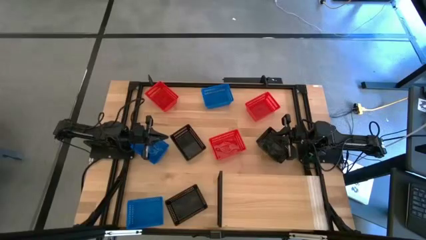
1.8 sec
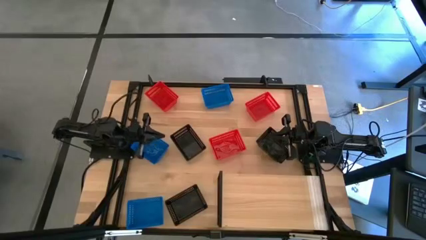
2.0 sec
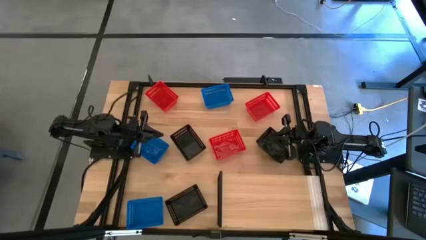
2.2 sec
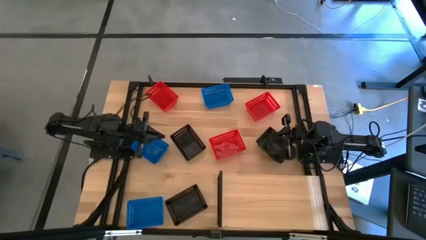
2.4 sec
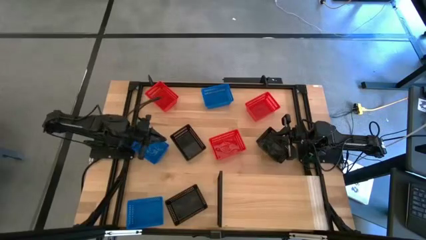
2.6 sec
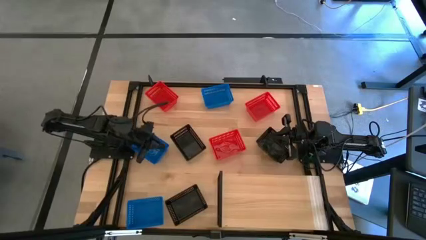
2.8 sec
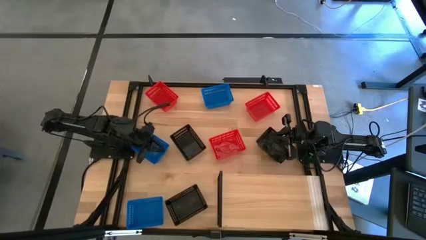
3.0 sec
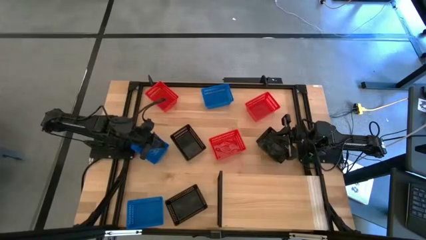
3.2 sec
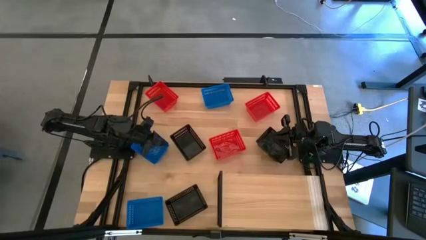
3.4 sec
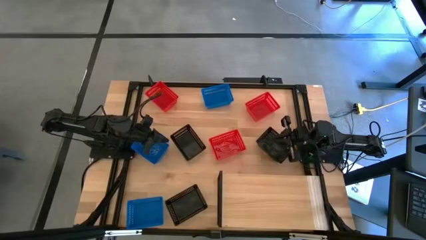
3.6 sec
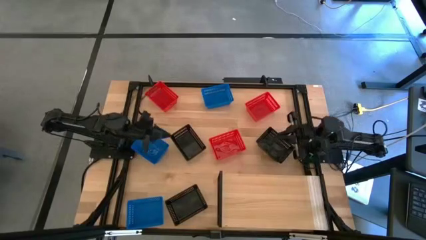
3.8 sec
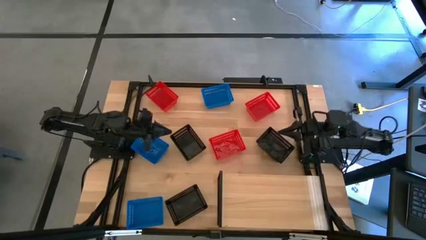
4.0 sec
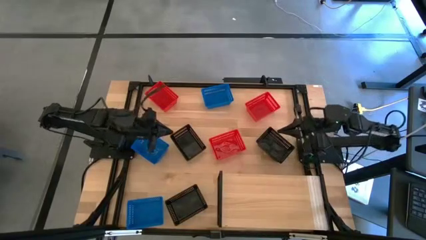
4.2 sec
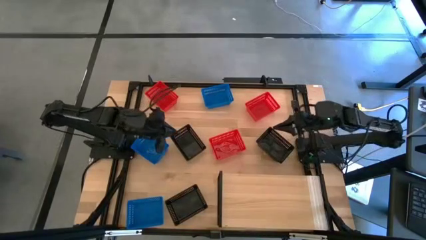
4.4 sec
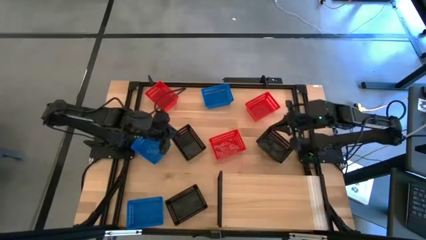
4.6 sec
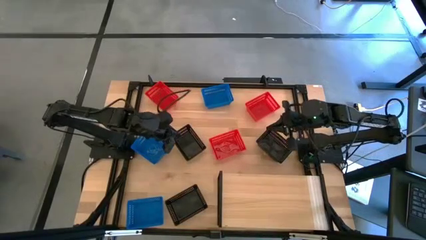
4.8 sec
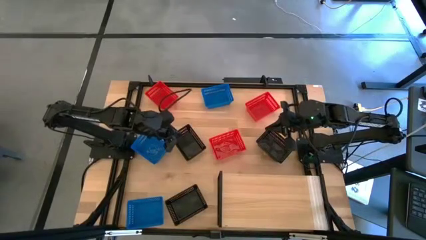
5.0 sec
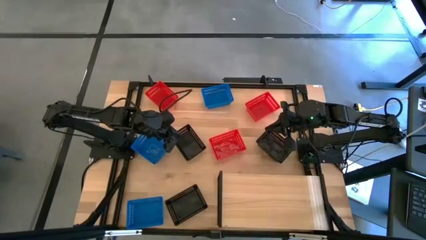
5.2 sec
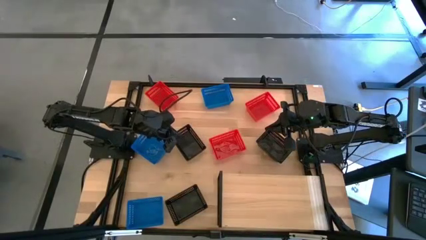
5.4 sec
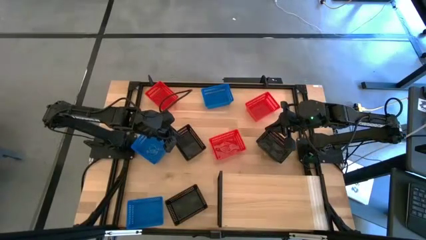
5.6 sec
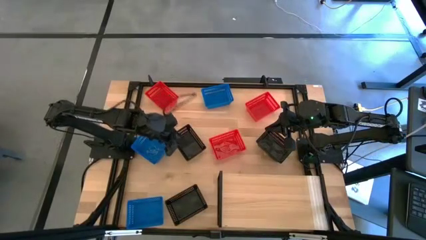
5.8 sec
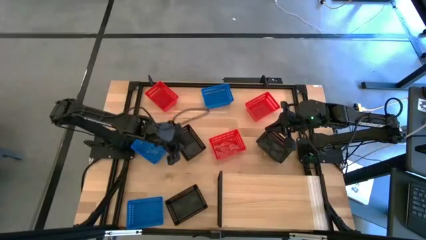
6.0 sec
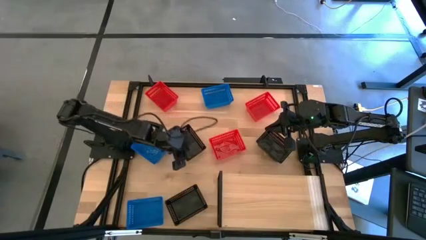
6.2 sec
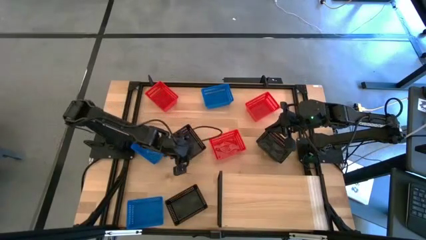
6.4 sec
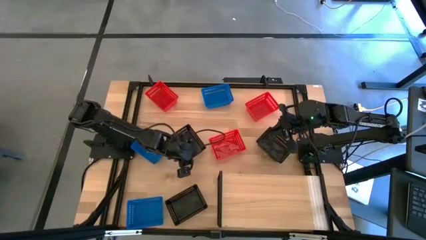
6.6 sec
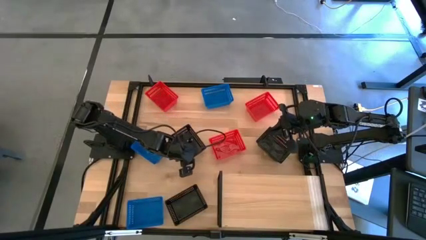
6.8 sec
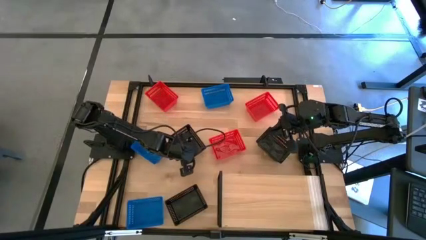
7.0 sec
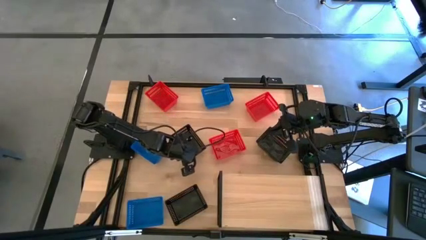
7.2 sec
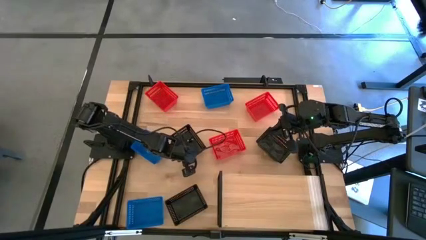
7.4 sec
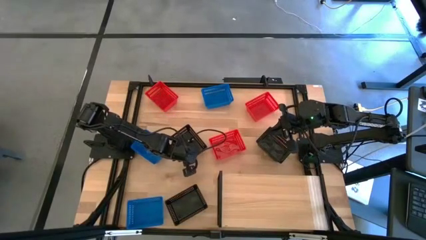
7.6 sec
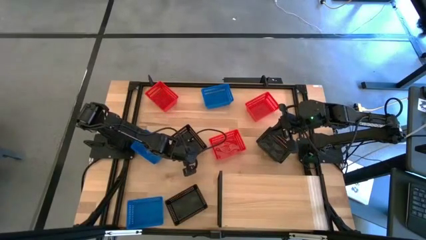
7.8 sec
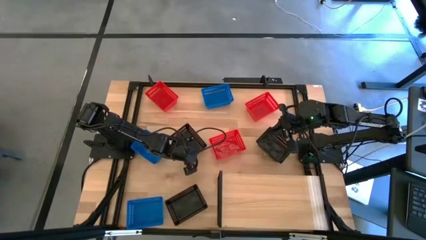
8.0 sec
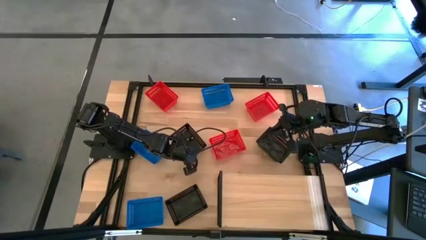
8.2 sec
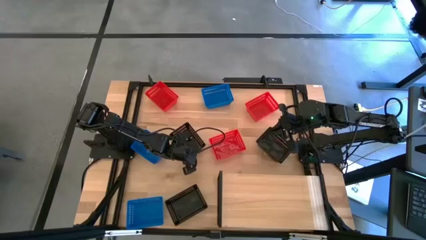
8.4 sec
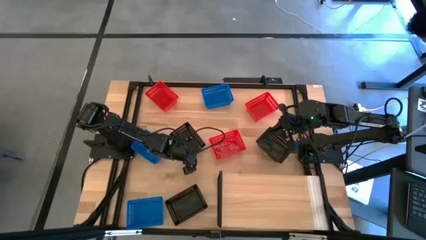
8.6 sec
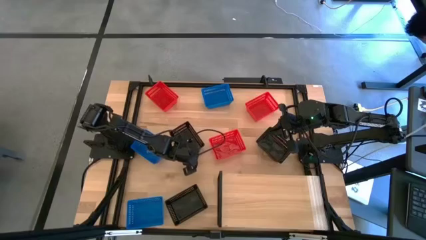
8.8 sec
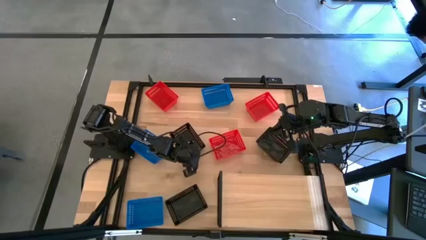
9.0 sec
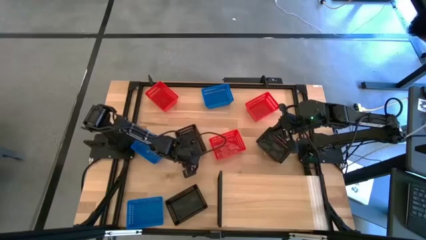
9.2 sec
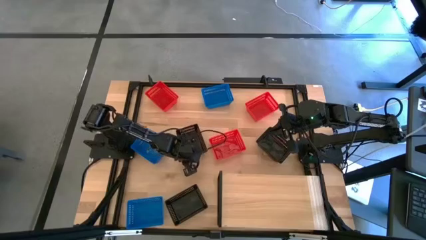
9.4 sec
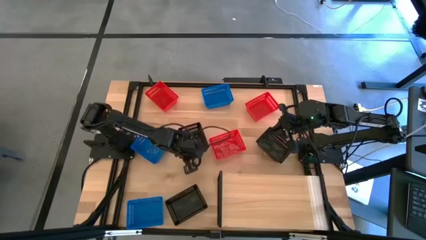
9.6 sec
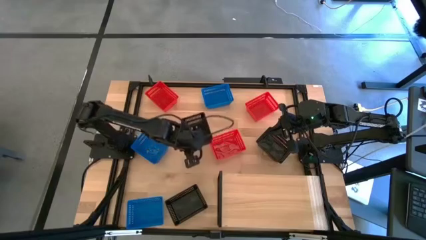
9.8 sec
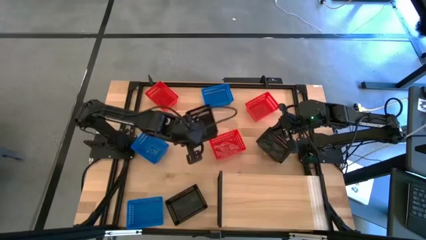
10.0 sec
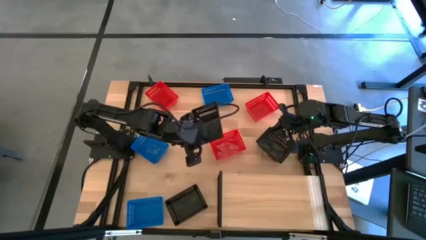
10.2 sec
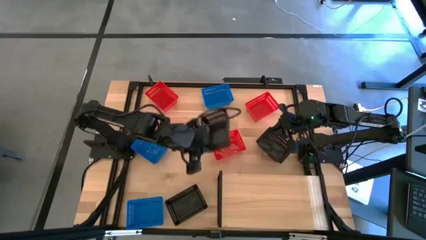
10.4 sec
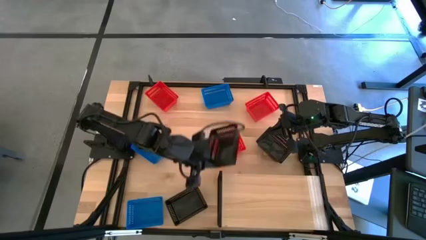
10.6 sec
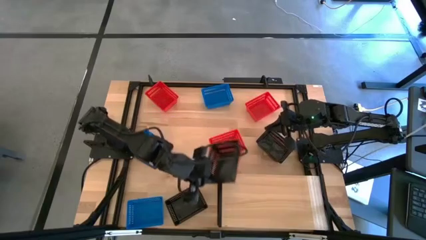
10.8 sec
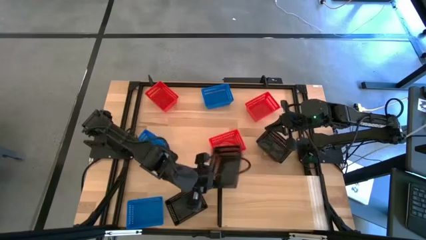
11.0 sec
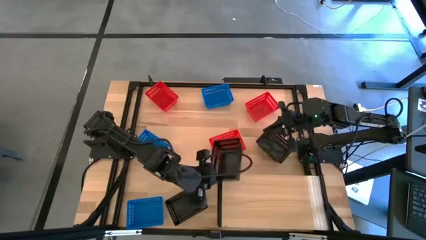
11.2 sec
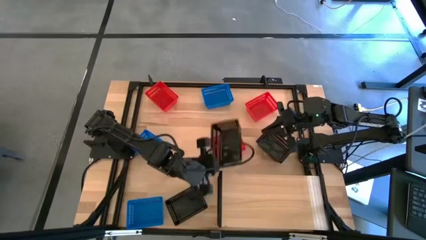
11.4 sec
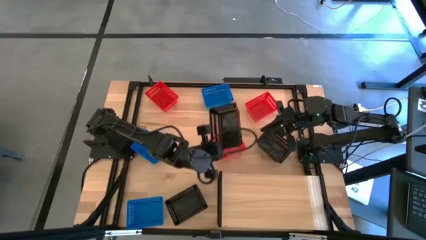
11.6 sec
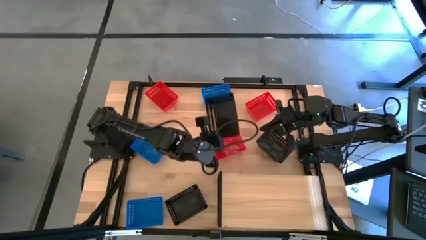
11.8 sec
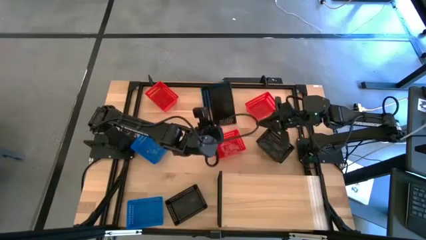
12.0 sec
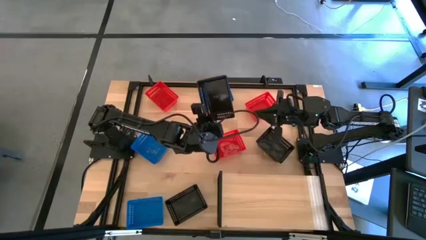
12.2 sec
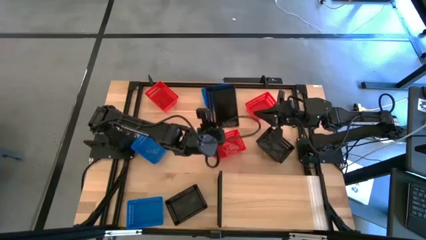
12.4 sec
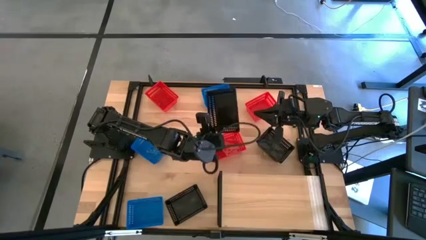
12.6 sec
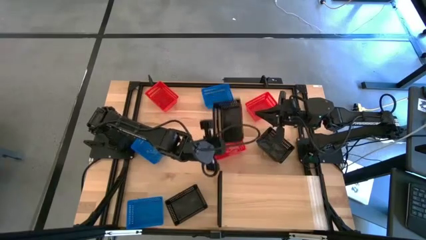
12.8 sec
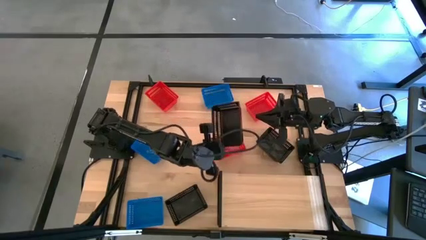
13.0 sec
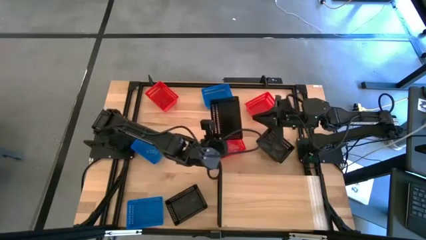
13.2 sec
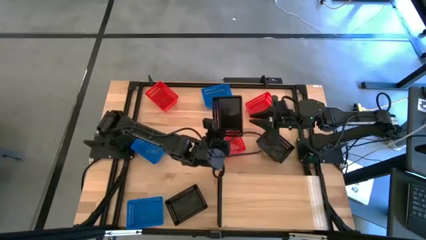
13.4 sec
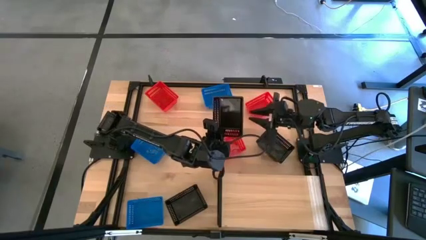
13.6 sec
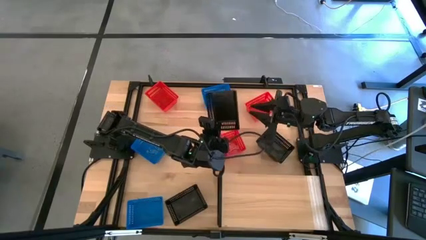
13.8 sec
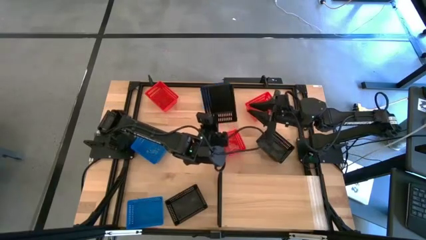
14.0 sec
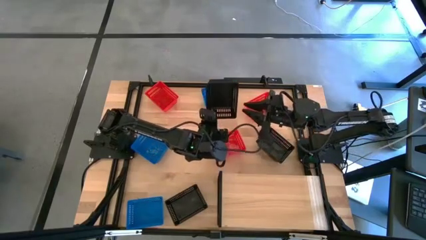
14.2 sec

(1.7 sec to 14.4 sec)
Task: Stack baskets on shelf by color
Put the top left black bin on the shelf

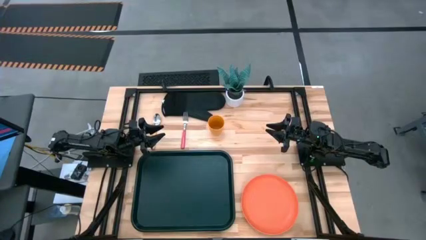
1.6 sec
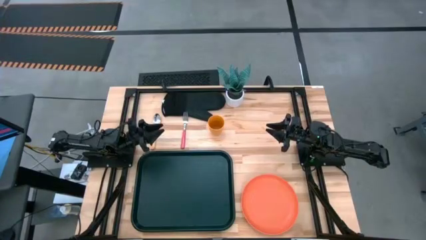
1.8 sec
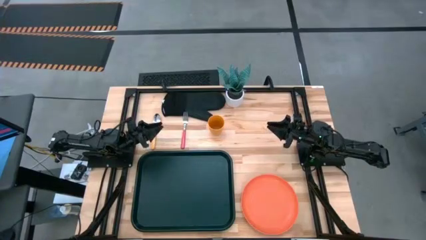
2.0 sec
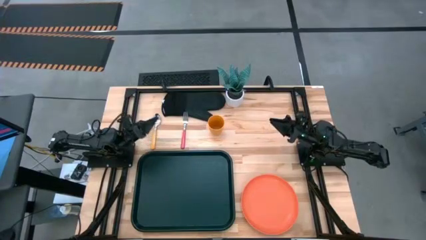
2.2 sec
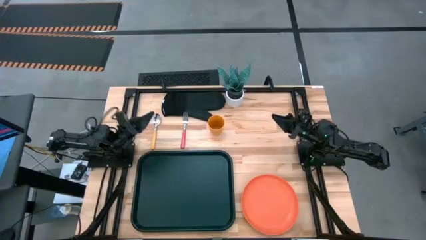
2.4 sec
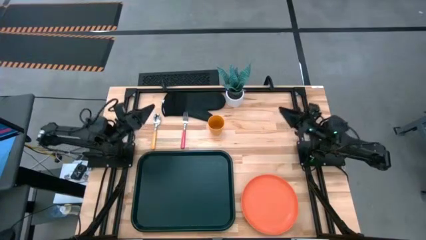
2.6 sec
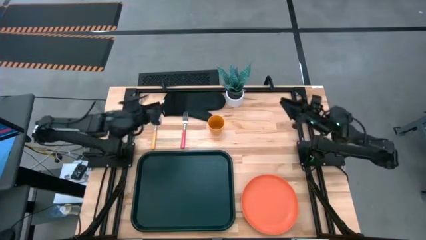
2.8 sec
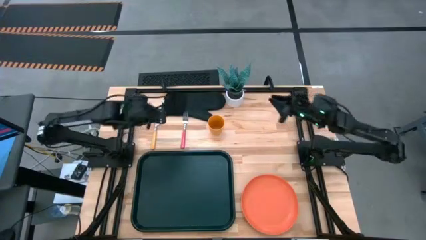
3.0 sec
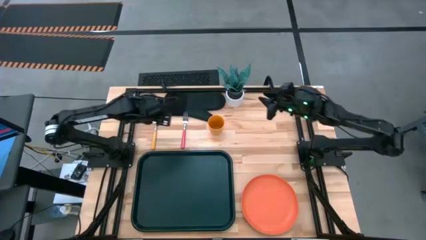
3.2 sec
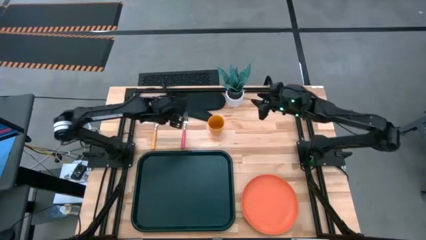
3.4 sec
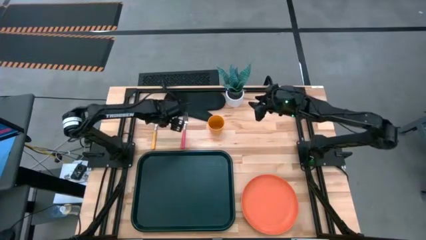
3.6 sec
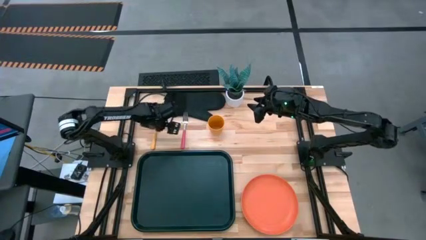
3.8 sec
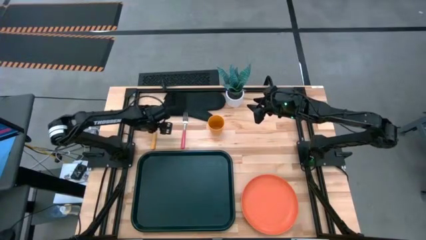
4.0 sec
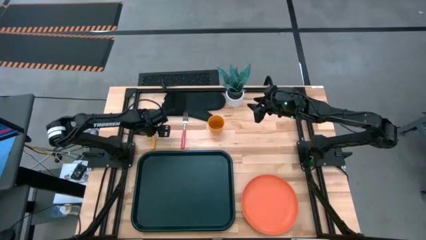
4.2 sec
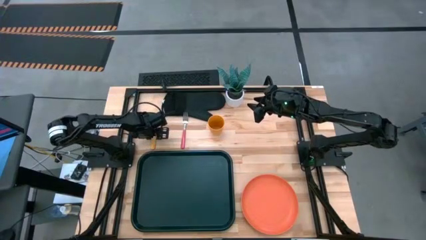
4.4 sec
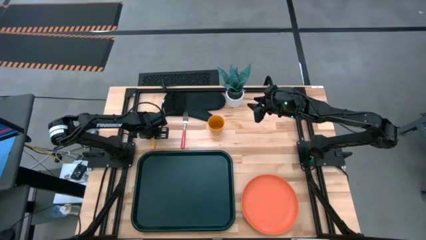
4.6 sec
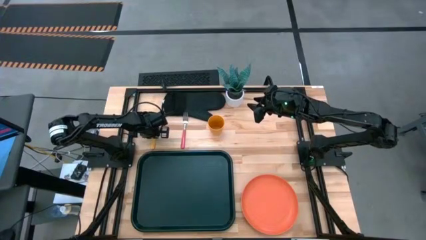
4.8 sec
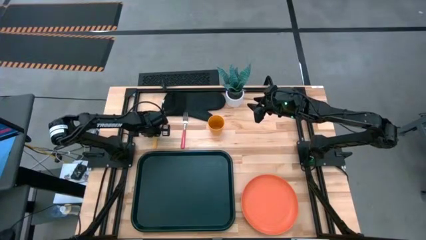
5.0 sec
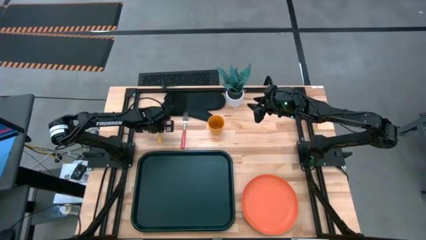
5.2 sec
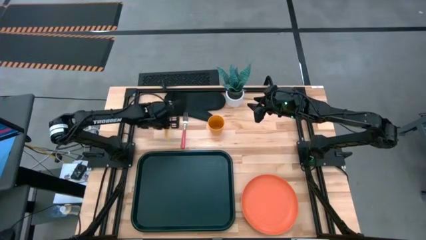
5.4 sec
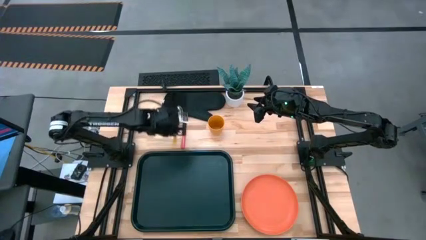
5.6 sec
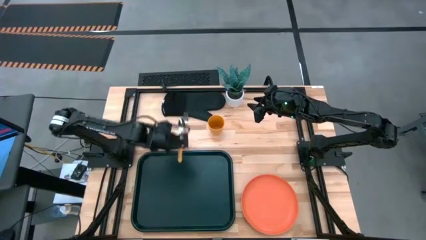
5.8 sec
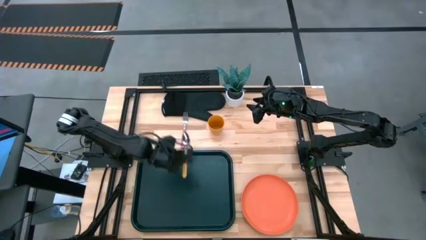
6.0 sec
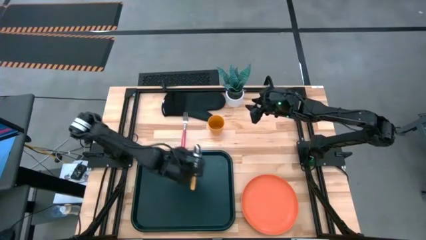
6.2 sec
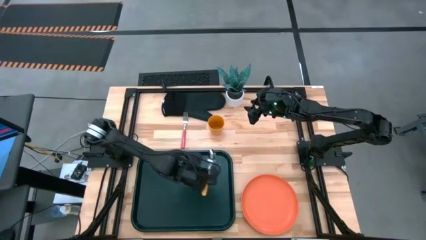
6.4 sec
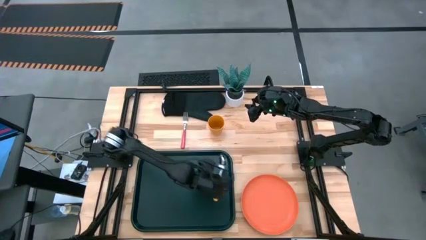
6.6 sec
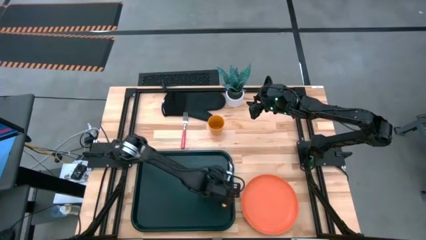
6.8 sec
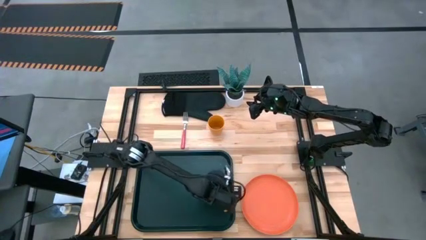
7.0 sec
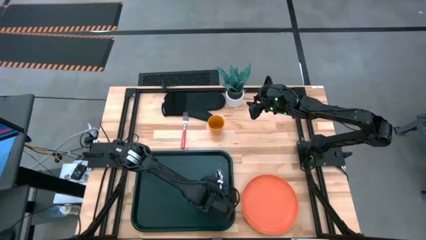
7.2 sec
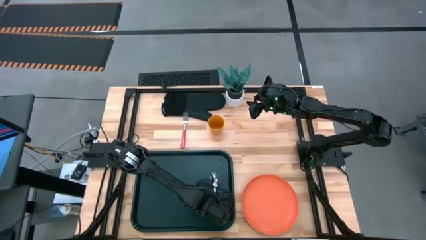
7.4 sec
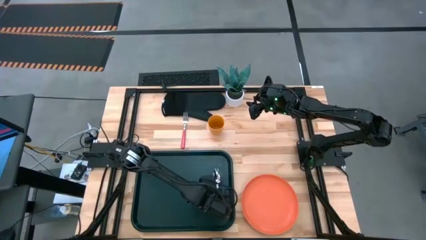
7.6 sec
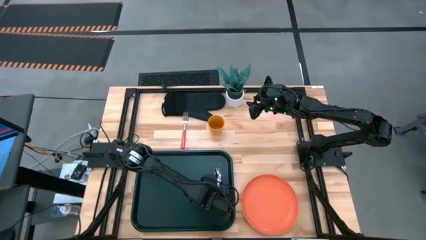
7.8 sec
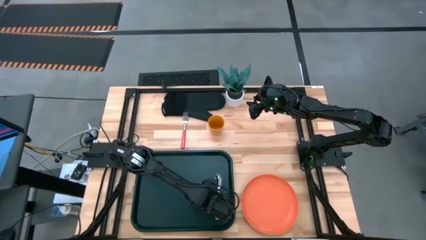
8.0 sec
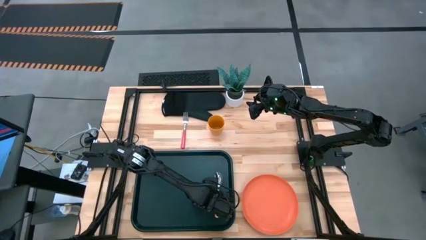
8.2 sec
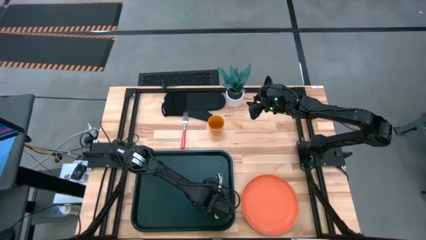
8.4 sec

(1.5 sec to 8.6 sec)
Task: Pick and place plate/cup/fork/spoon on tray
Put the spoon to the right of the serving tray
